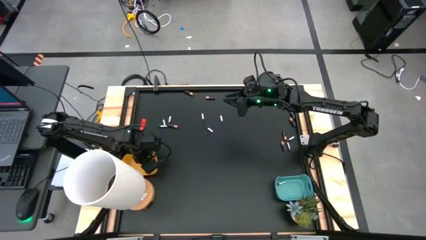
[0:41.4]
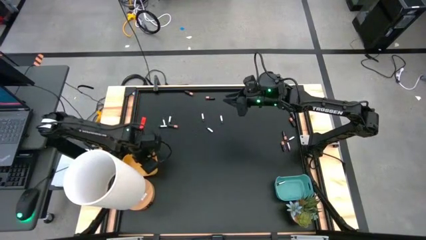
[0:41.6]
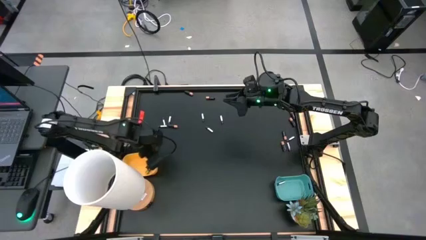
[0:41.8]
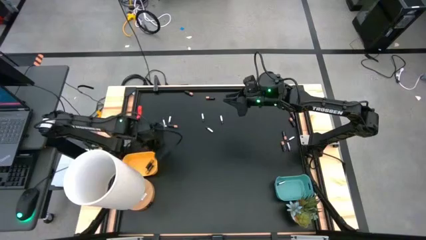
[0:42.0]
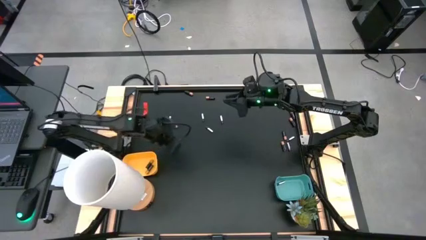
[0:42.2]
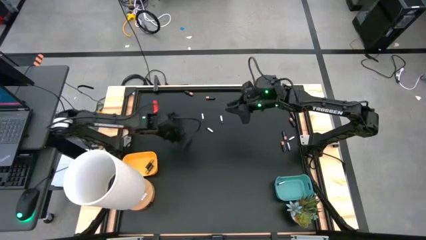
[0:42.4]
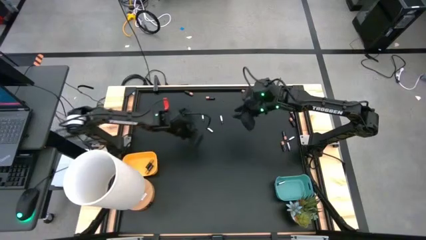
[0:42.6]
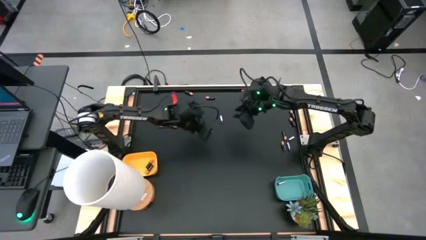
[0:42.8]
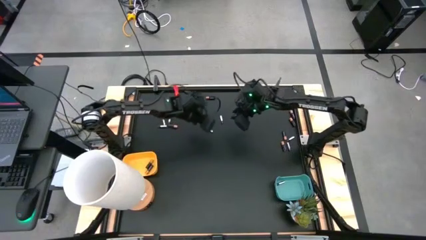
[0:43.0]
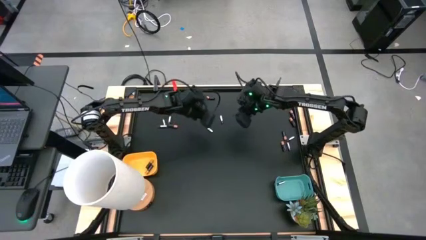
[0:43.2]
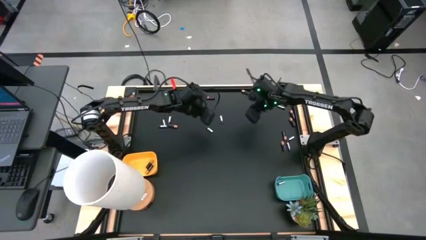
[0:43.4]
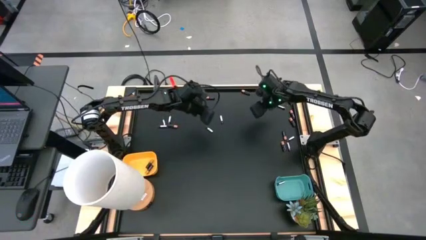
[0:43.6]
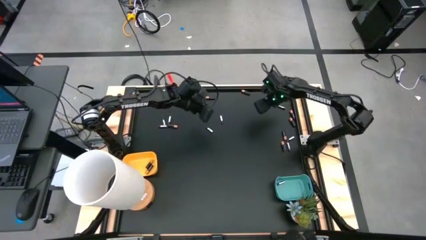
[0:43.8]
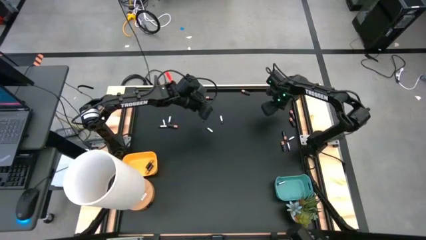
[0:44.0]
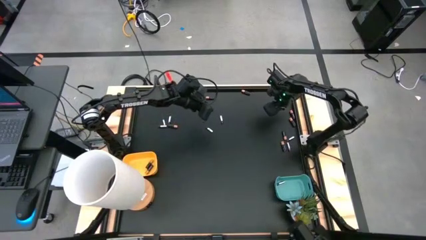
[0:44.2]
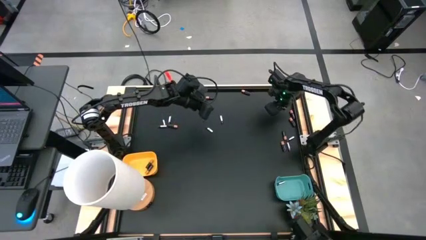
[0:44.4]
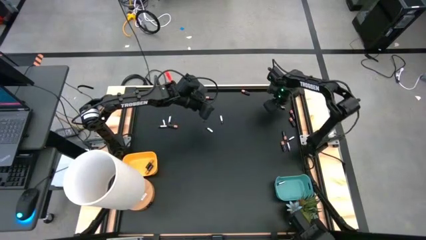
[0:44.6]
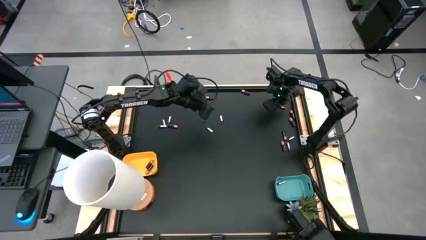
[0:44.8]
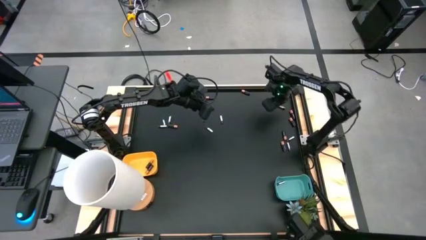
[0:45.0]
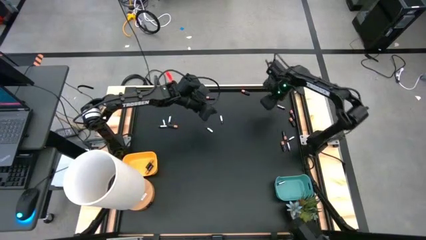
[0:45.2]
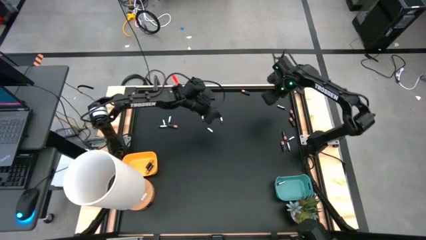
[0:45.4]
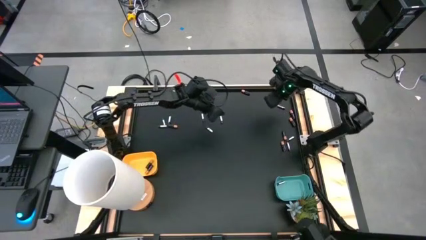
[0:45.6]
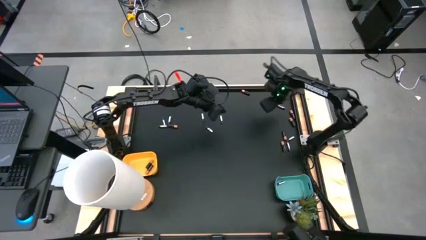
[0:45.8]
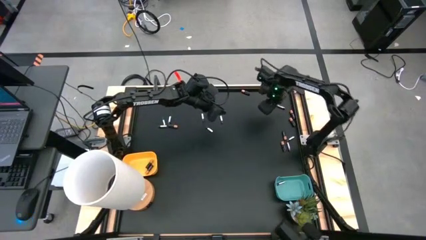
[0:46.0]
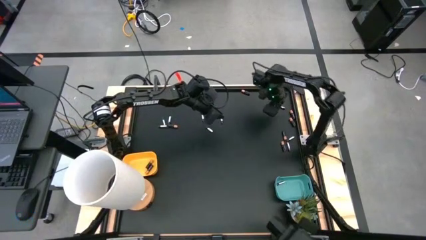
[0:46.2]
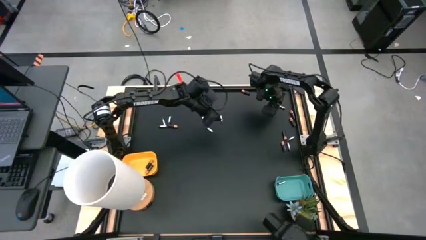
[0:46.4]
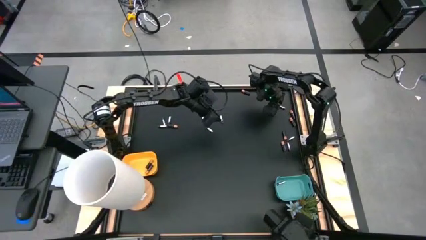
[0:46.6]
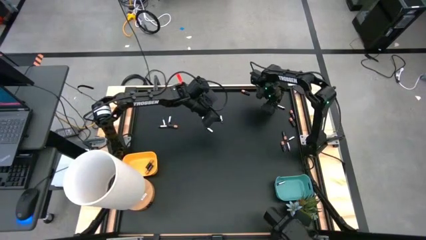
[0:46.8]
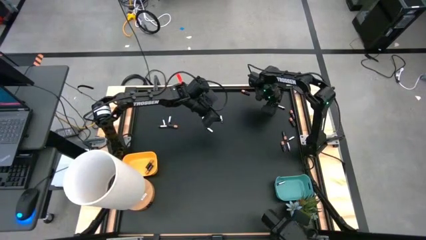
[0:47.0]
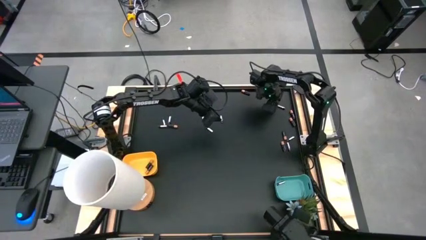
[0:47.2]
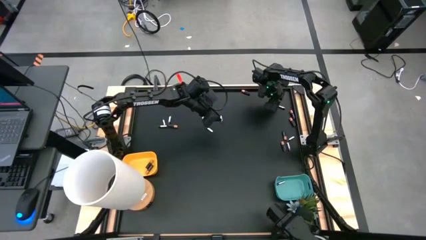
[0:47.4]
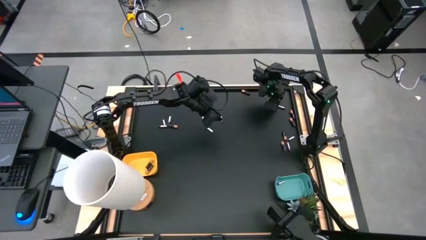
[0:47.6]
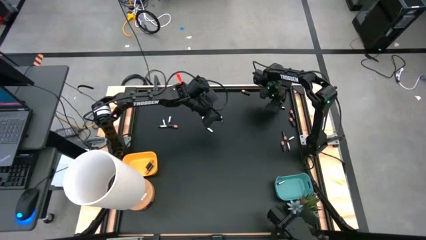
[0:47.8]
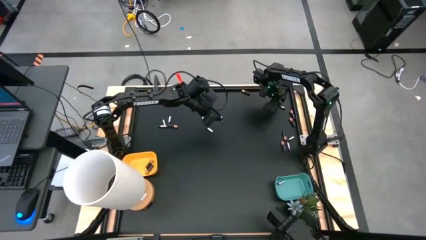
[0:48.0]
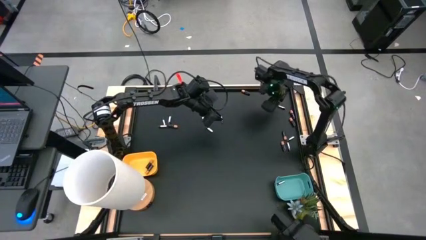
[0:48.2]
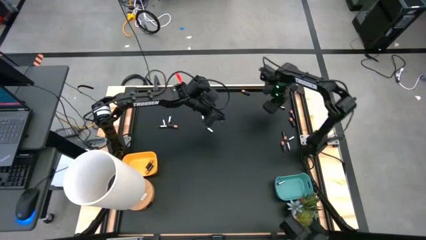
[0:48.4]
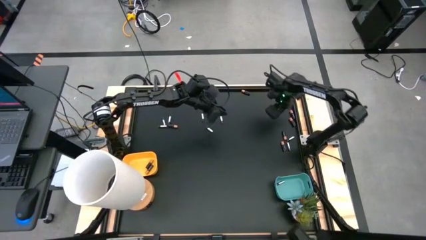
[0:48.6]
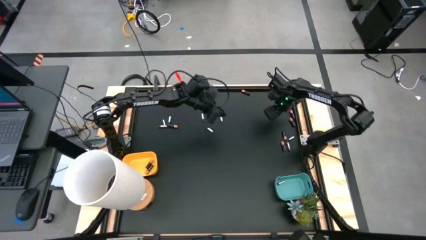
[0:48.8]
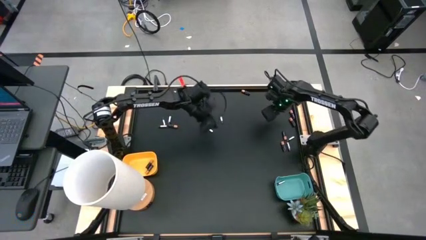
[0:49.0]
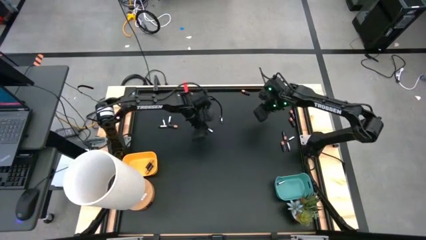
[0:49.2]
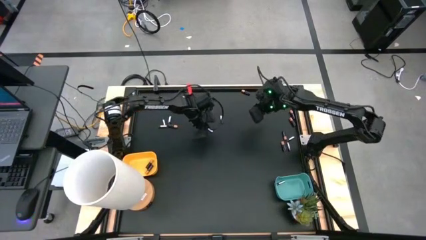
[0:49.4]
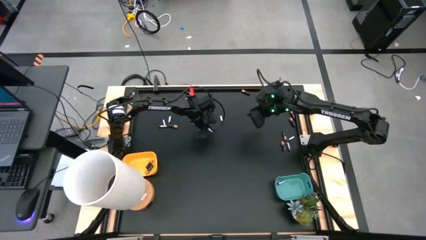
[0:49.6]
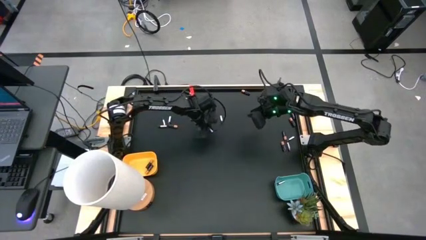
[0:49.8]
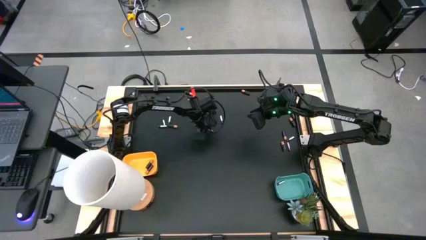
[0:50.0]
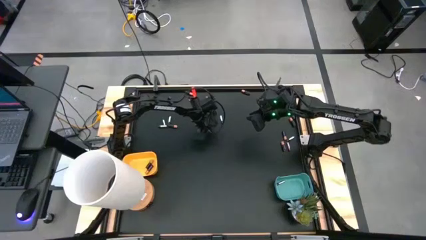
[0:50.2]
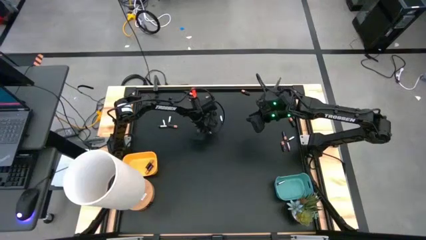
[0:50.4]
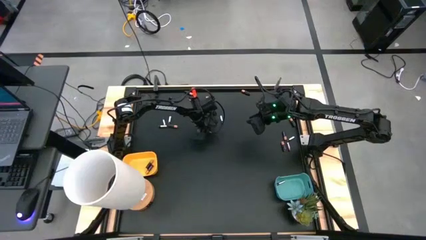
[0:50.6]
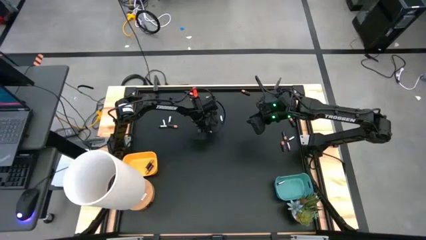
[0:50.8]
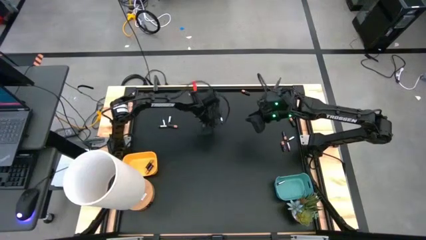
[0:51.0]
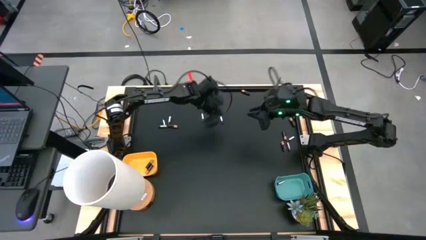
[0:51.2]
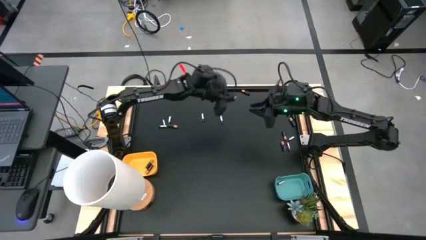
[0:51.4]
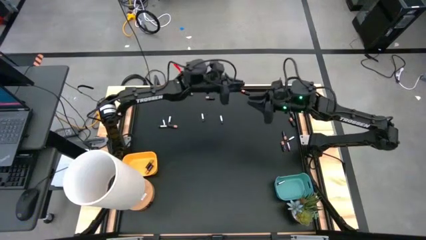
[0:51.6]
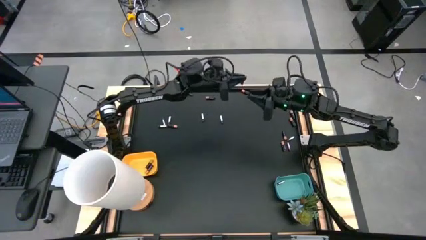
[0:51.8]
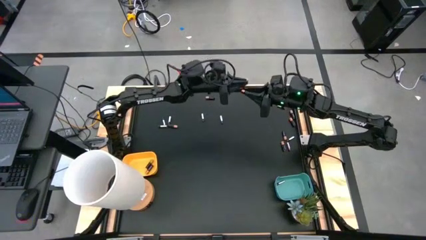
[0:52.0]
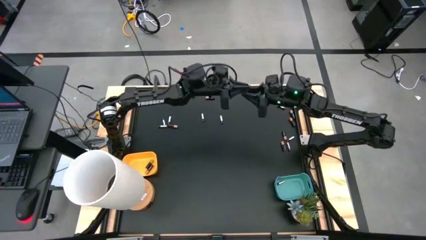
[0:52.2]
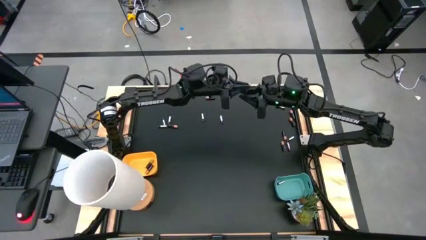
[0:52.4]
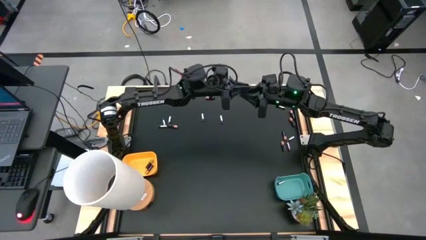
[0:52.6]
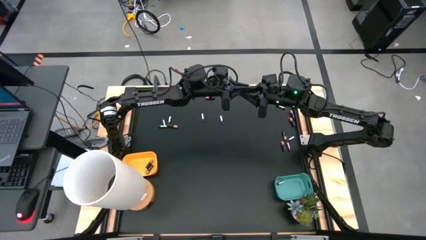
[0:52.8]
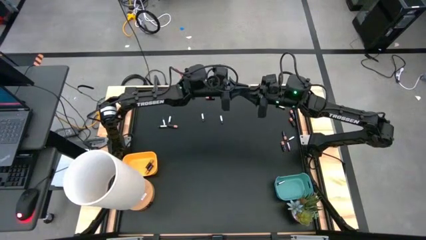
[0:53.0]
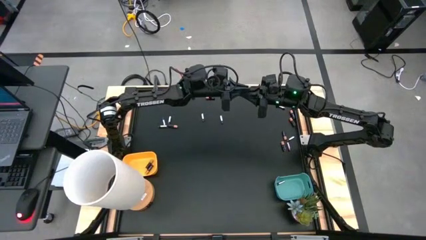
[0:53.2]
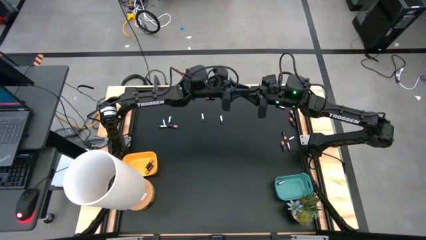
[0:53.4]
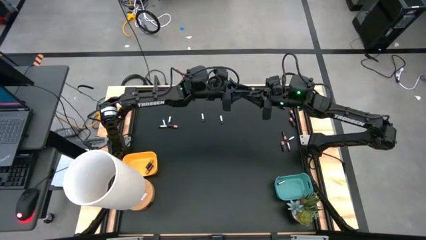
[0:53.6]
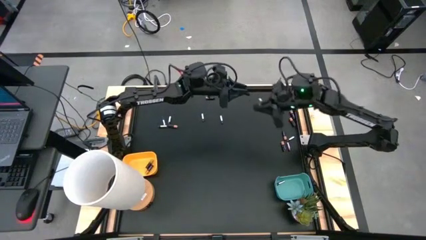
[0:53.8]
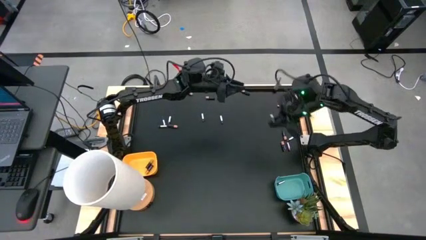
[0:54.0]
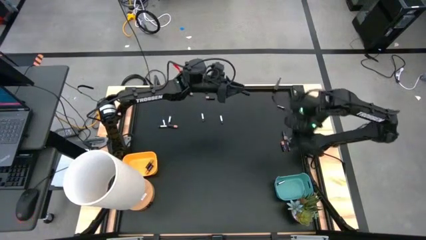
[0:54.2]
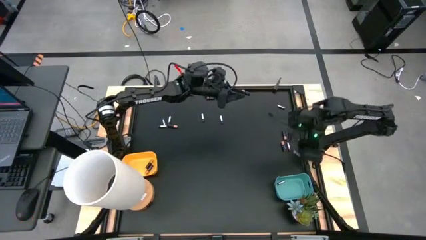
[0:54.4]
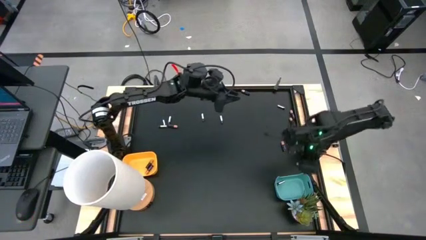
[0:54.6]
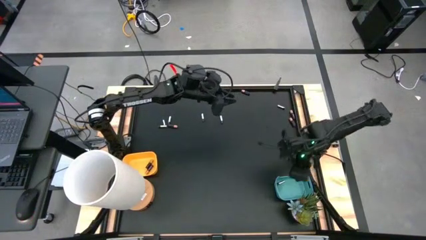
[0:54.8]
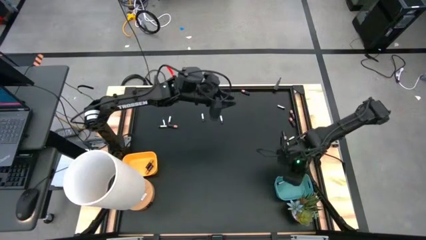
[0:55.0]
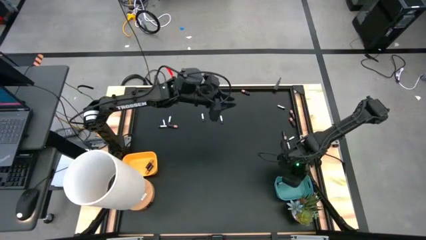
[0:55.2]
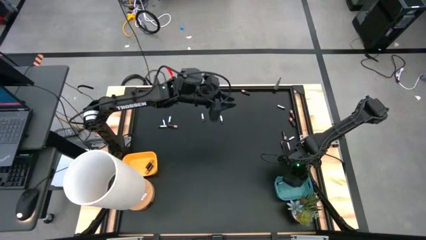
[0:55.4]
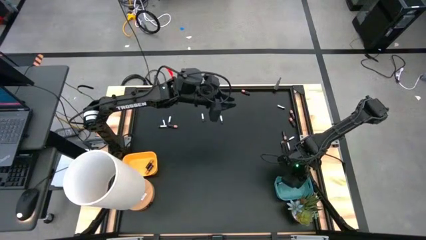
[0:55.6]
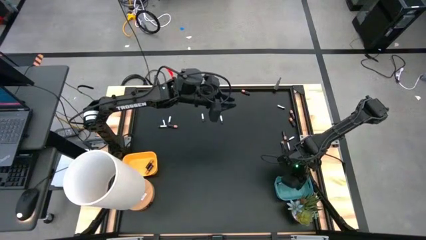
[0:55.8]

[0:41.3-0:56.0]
Task: Sort batteries
Put the silver battery into the green bin

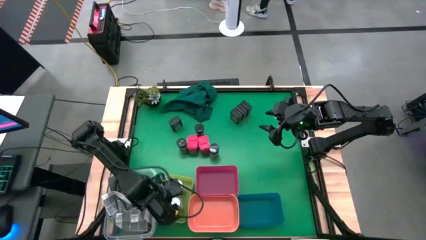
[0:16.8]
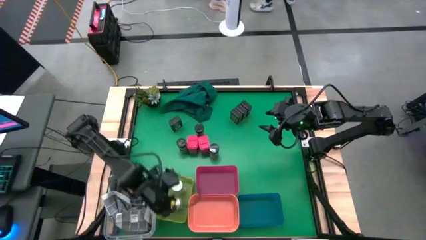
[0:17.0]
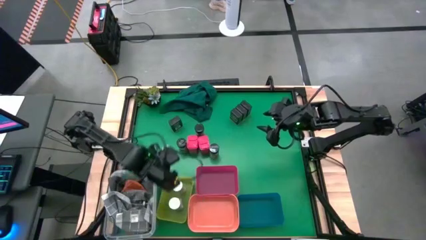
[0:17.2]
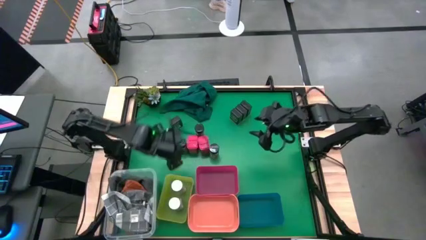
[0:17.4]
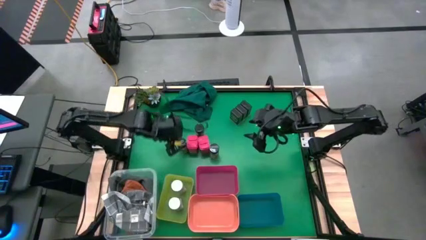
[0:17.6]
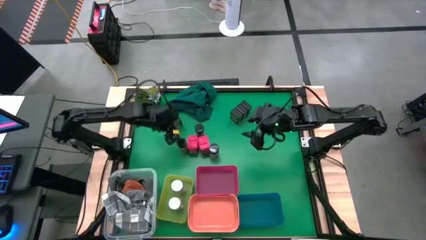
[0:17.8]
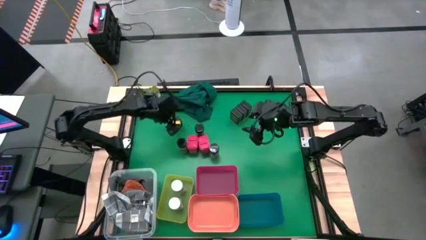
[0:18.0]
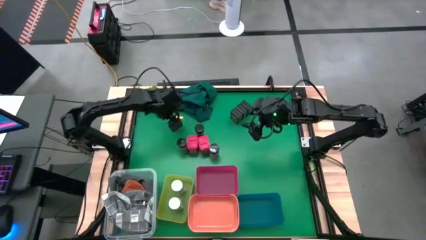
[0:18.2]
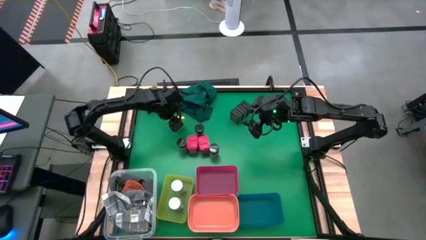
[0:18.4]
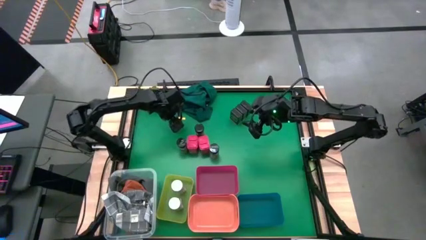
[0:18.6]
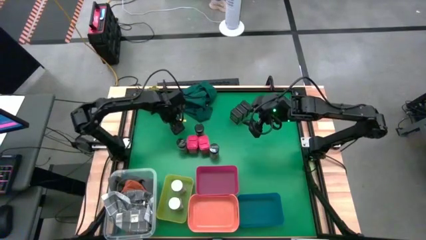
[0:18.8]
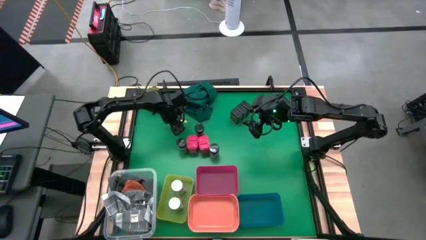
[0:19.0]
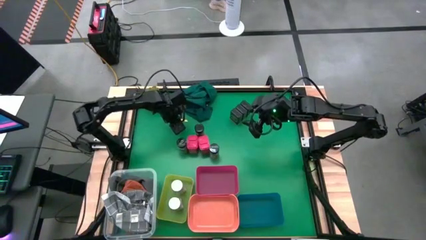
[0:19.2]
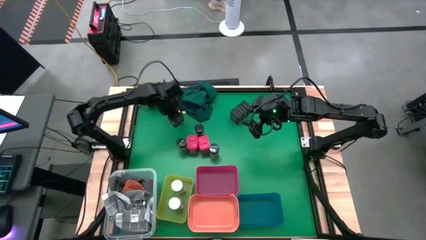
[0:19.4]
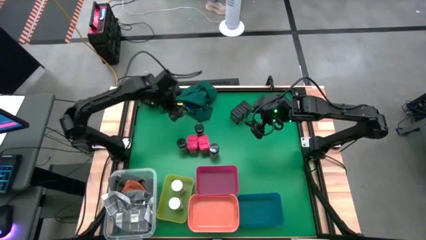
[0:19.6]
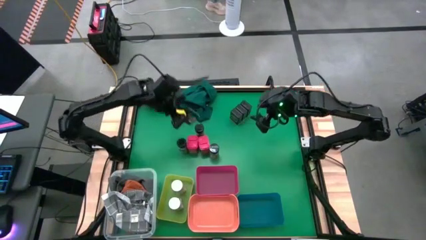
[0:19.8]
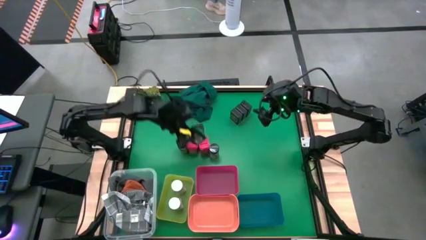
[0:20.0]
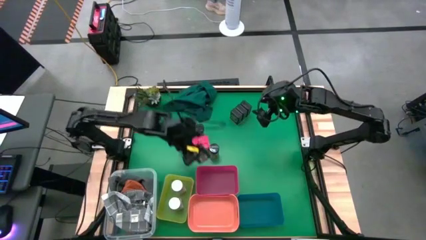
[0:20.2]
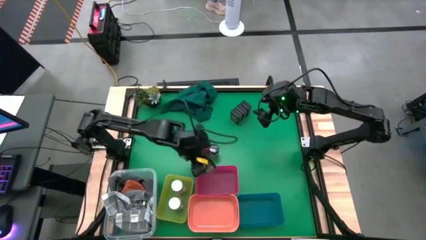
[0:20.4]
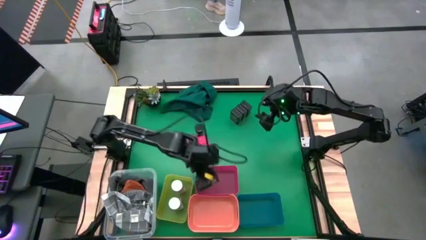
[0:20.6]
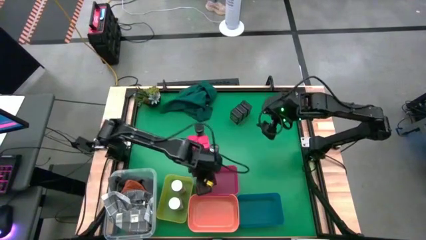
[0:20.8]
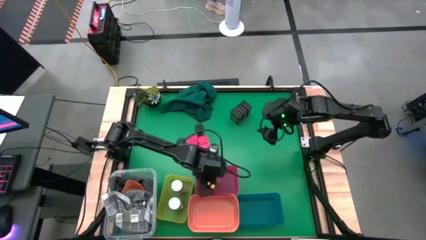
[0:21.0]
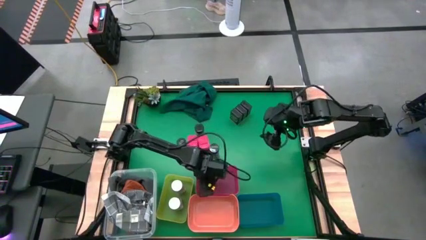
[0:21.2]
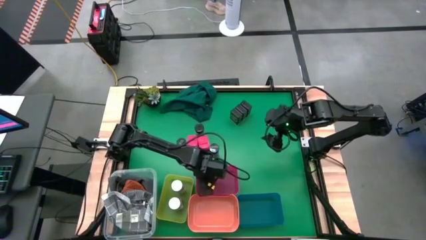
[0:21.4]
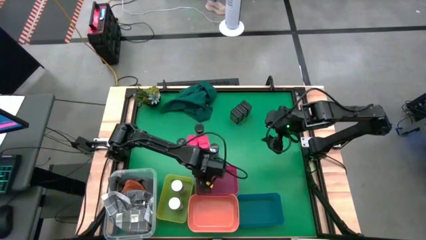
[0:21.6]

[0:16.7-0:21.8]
Task: Sort spices by type
Put the left black seasoning can into the pink bin
